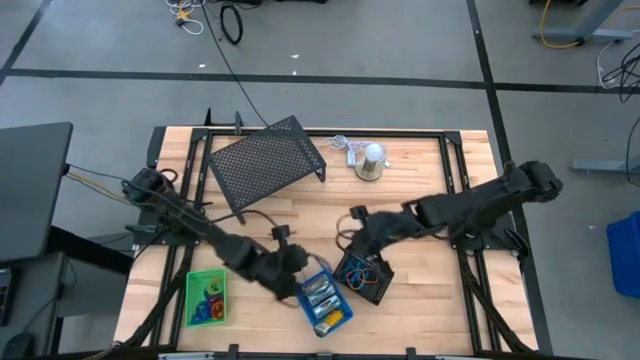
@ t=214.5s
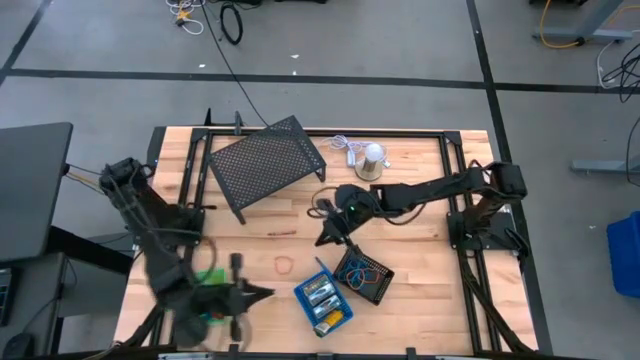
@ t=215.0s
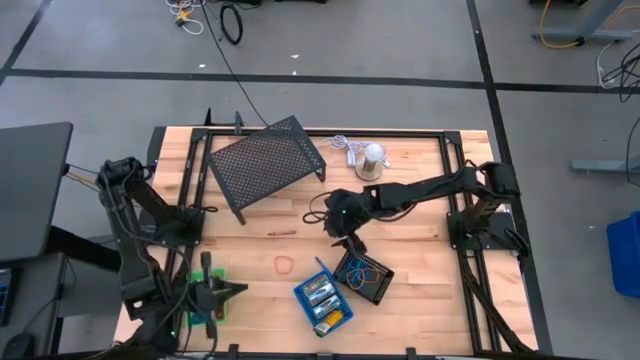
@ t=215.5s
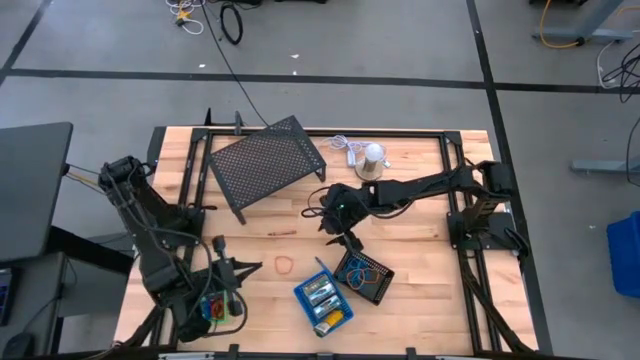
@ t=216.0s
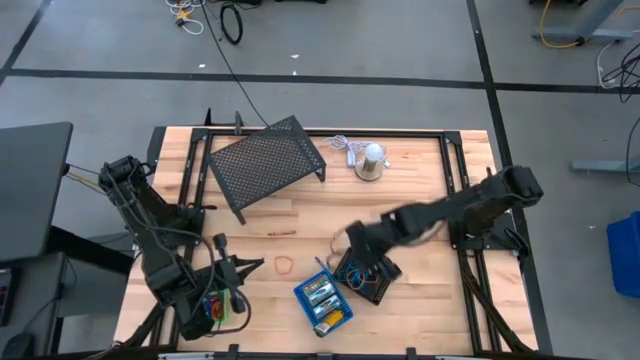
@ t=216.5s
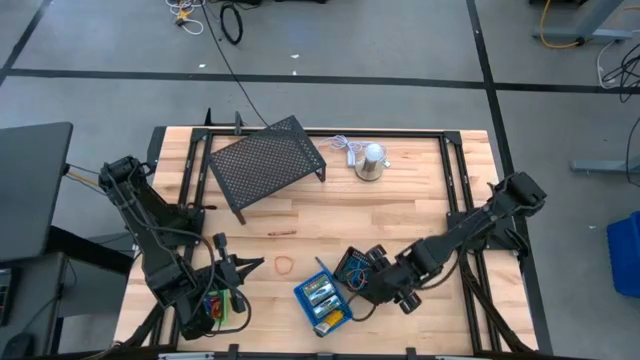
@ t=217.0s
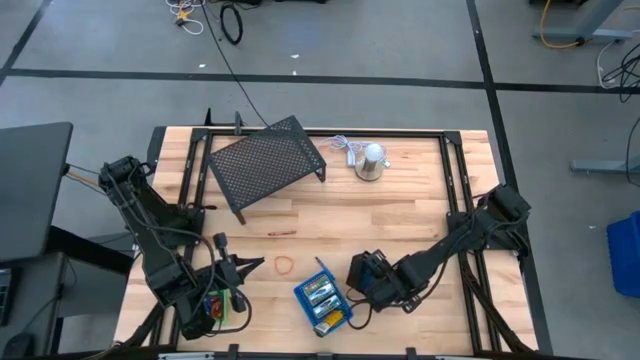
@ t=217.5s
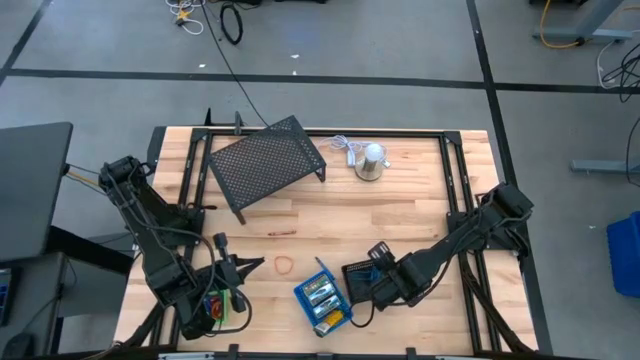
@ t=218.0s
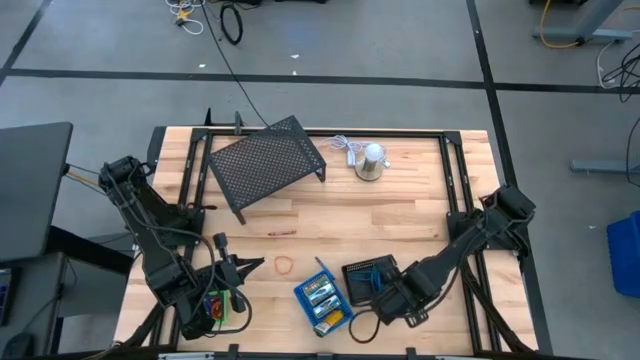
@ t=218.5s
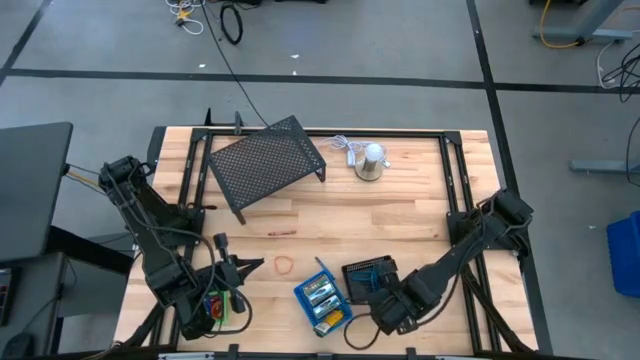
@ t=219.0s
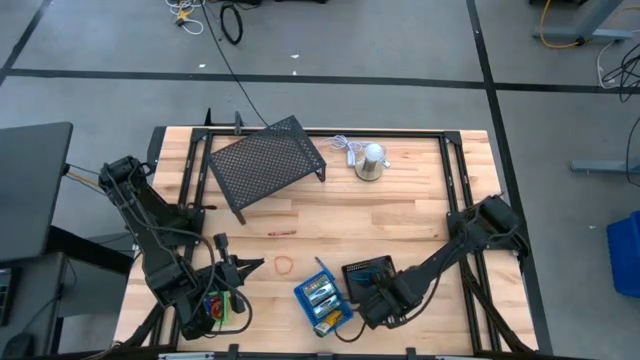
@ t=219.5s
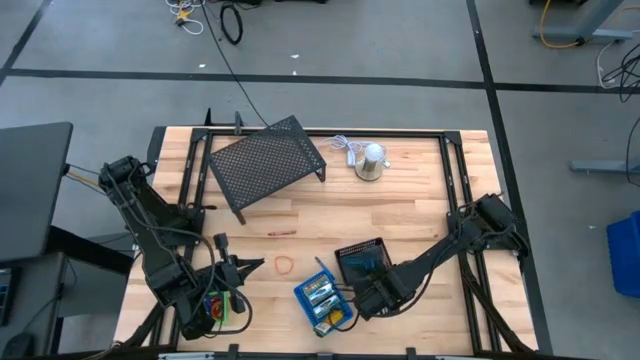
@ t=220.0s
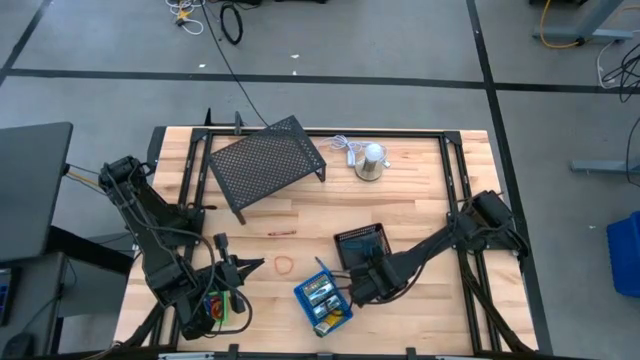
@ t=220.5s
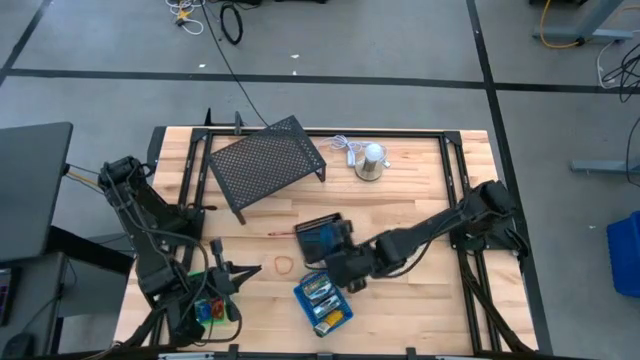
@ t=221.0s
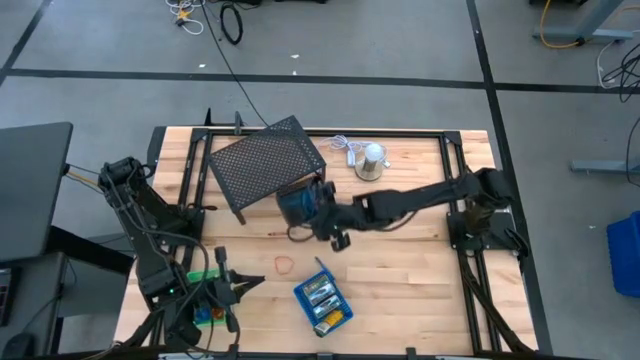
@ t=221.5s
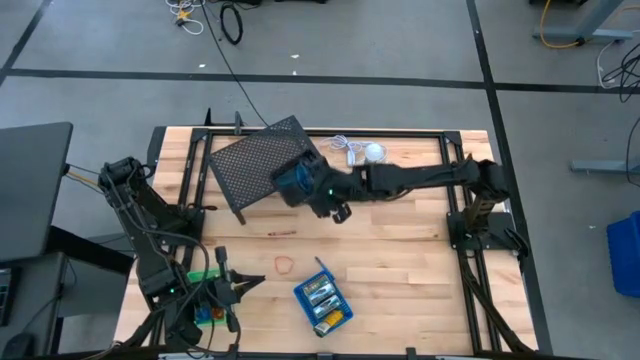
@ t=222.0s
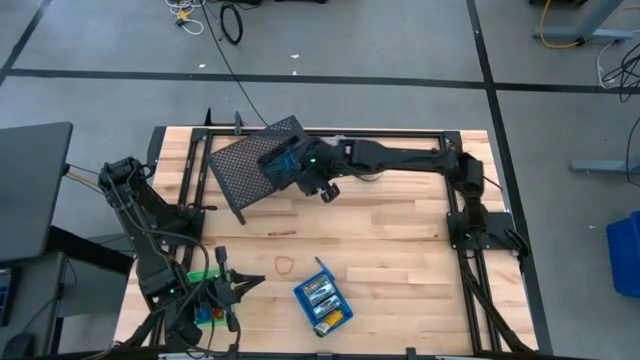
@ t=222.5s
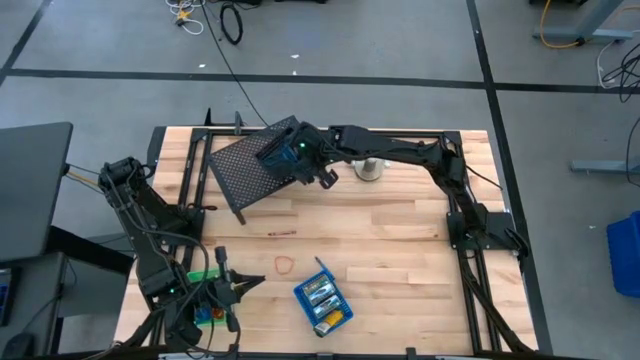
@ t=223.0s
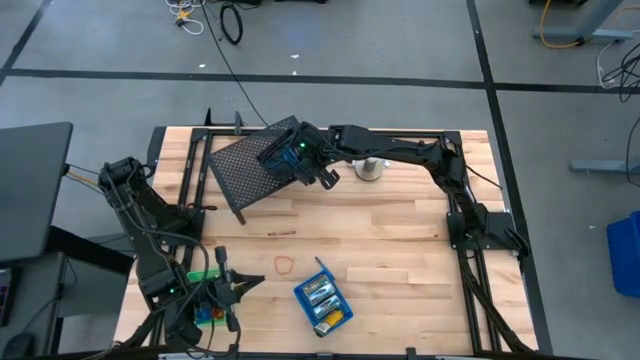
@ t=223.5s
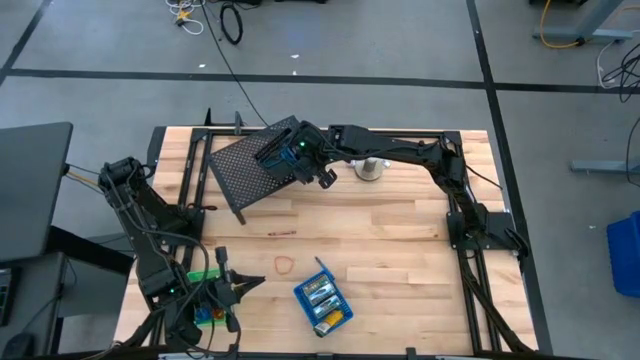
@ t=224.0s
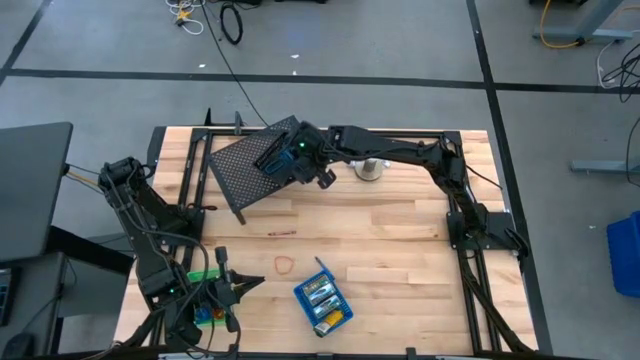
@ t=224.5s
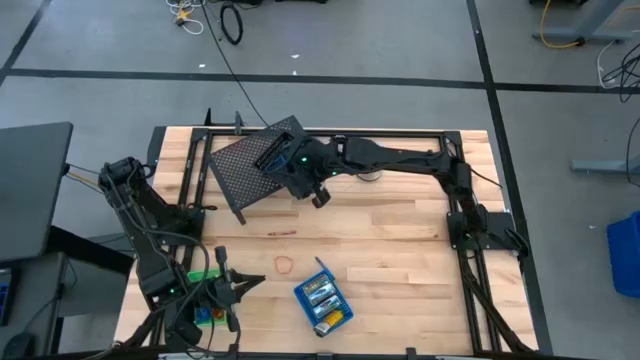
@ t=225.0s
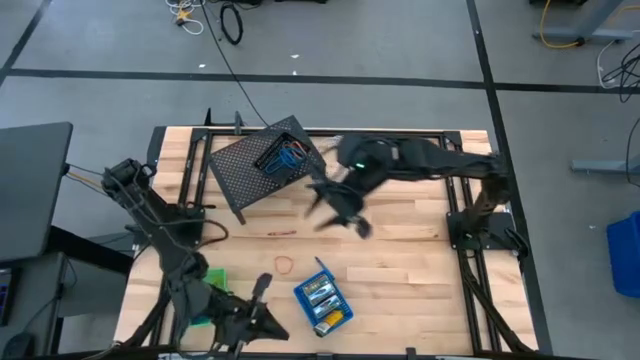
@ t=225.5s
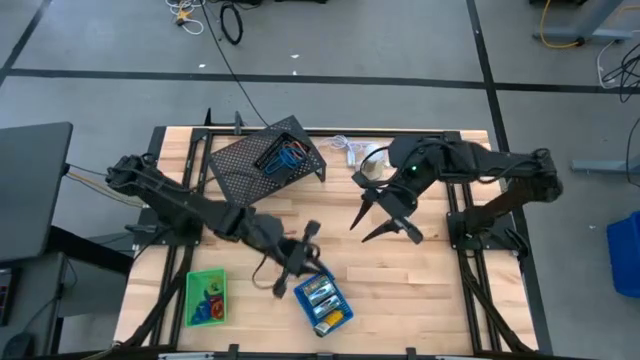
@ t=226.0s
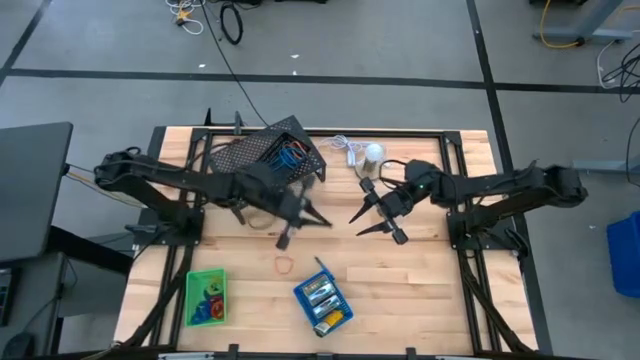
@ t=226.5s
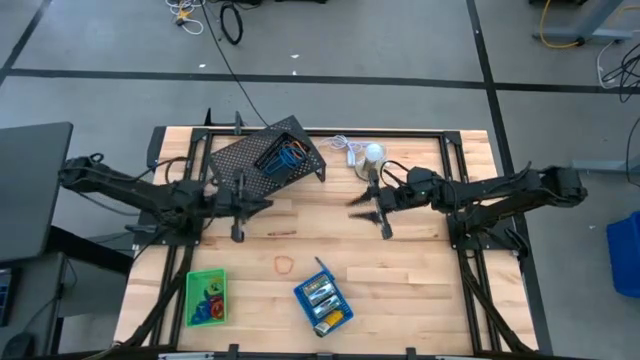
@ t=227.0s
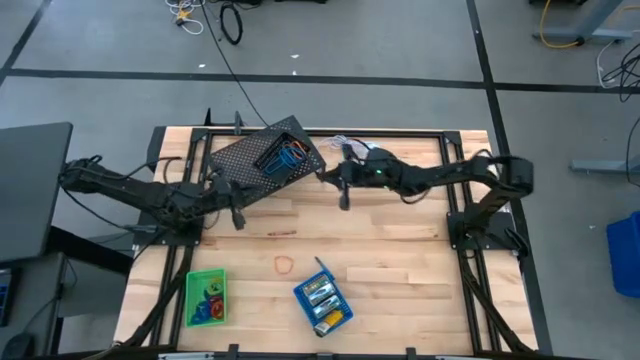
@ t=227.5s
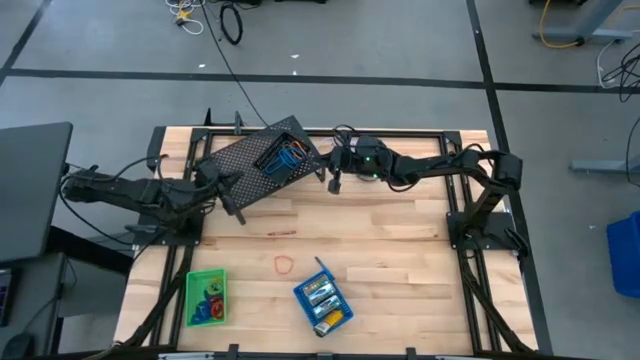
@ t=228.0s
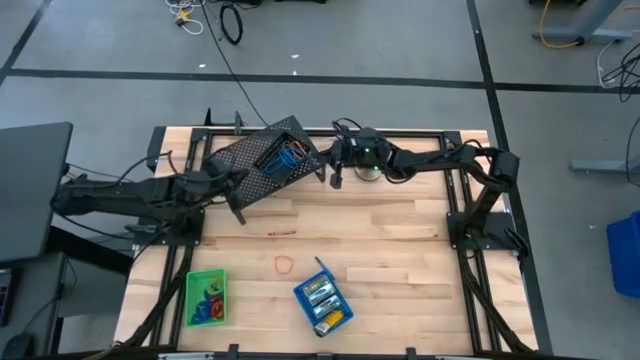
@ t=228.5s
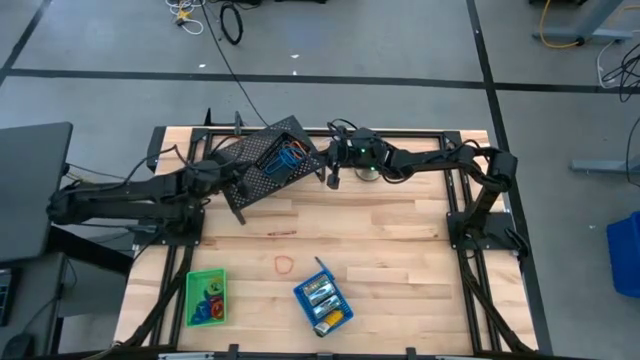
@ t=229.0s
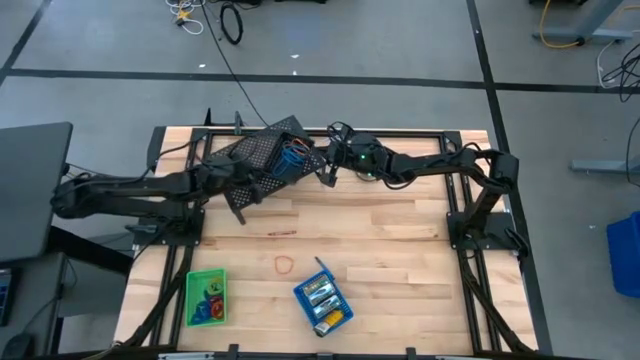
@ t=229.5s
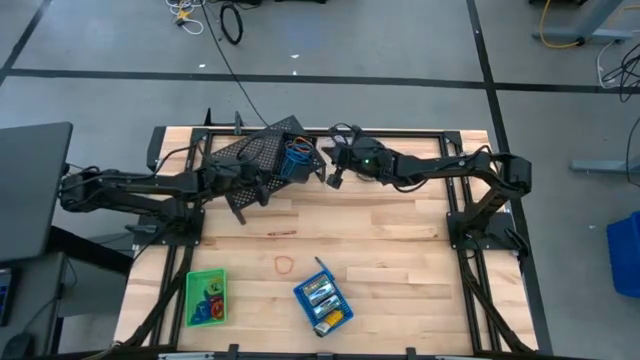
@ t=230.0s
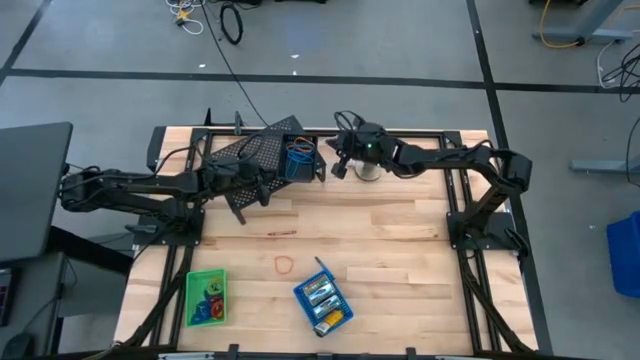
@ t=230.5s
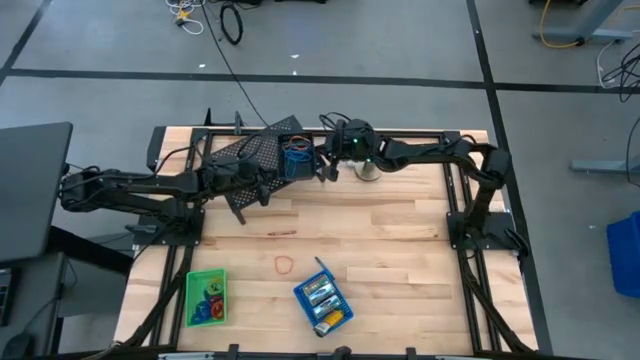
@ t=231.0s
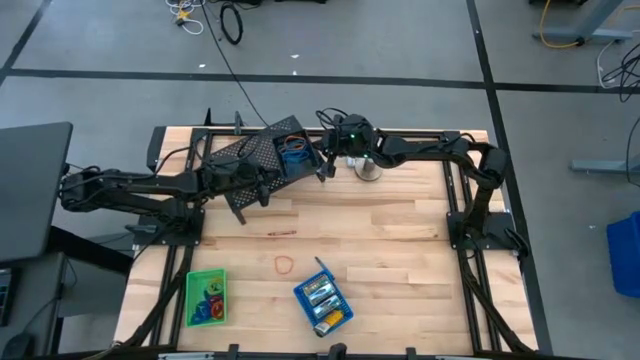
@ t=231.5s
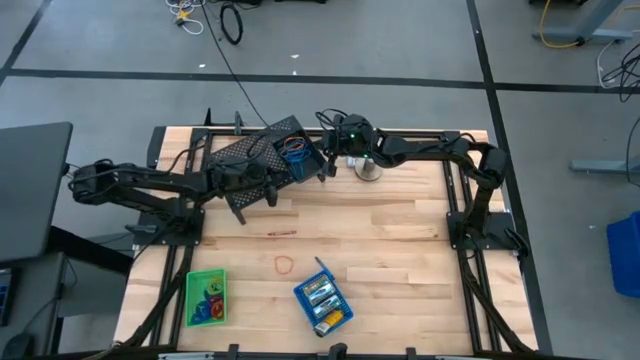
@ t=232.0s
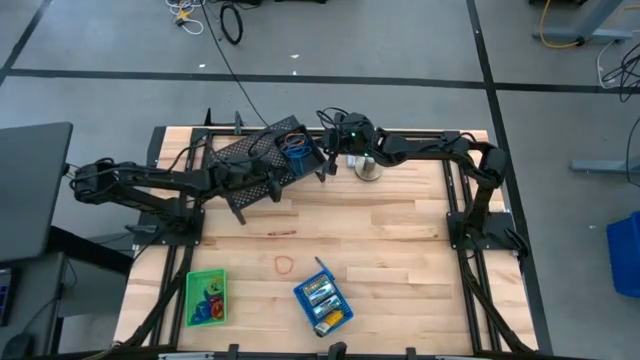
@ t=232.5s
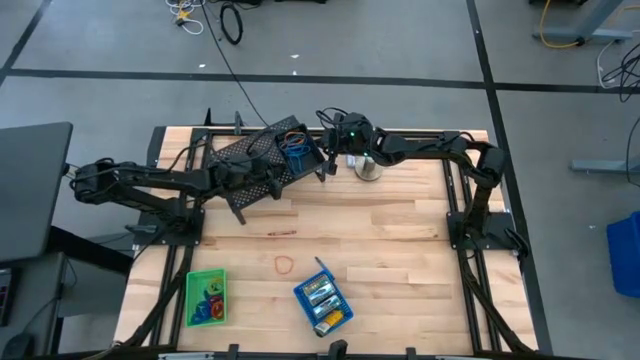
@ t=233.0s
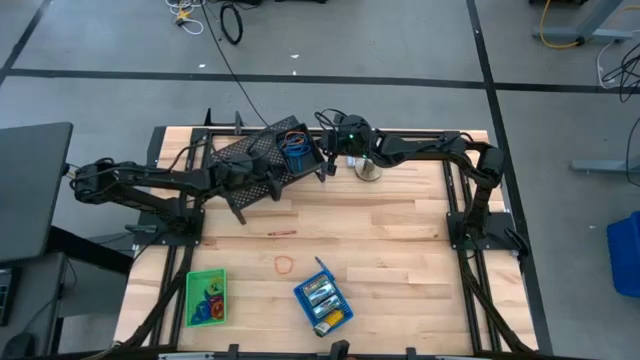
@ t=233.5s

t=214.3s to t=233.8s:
Task: Pick & Place Office Desk Supplies
Put the black bin with rubber bands on the shelf
